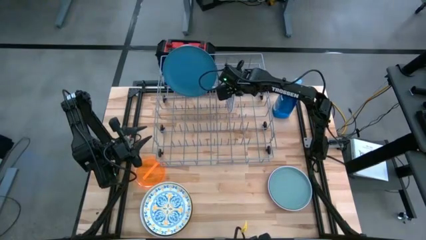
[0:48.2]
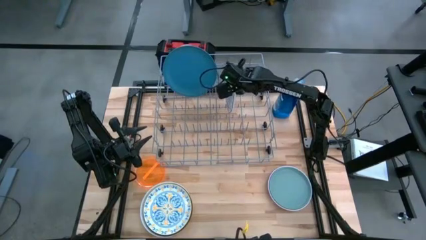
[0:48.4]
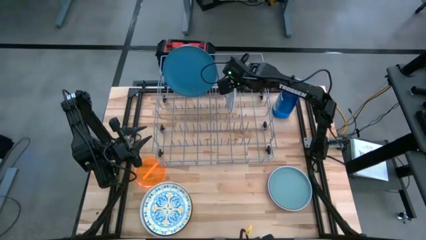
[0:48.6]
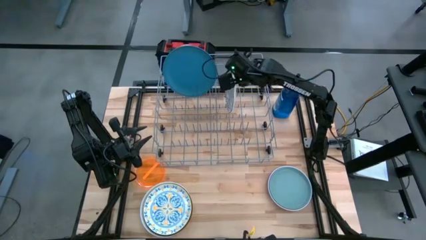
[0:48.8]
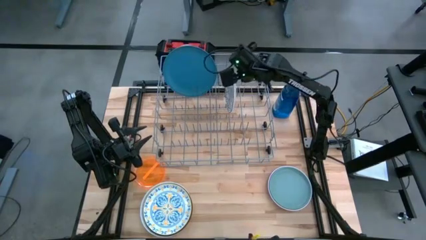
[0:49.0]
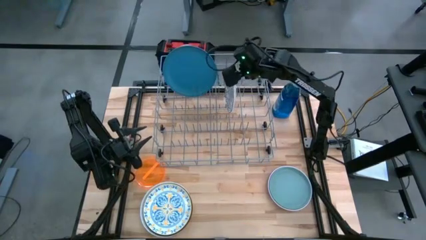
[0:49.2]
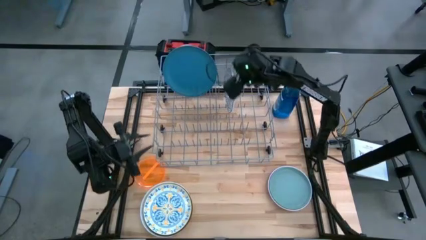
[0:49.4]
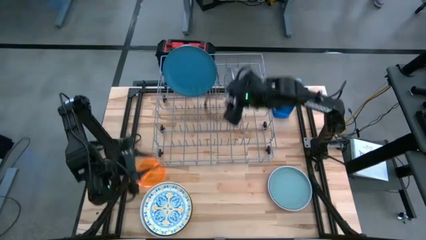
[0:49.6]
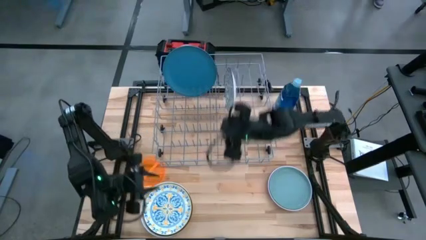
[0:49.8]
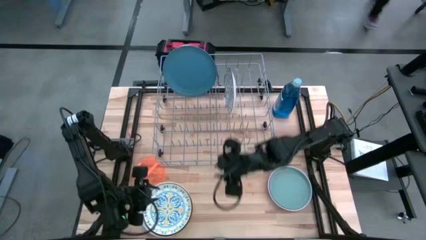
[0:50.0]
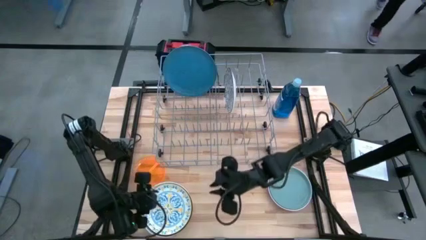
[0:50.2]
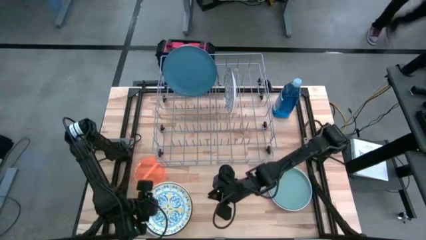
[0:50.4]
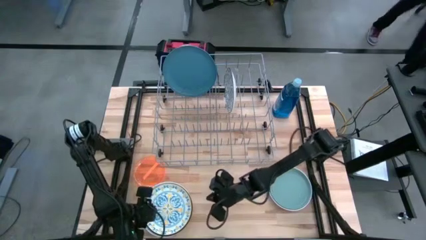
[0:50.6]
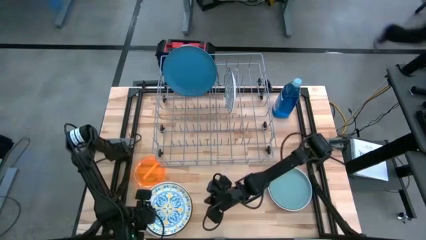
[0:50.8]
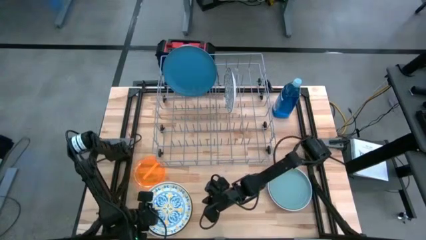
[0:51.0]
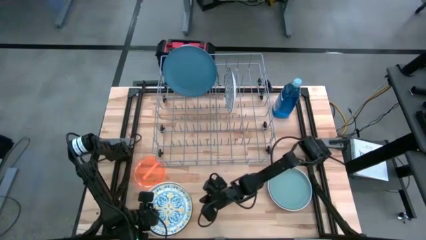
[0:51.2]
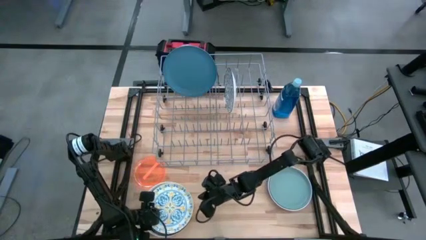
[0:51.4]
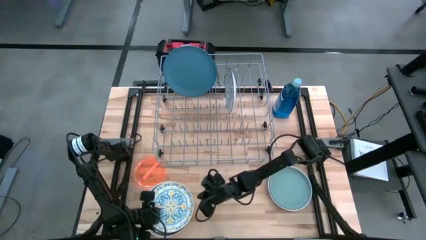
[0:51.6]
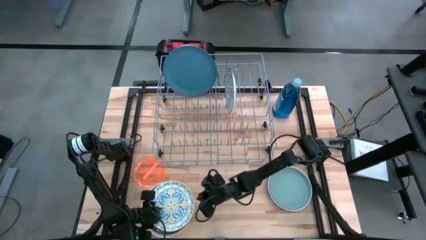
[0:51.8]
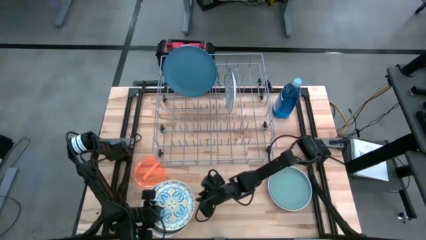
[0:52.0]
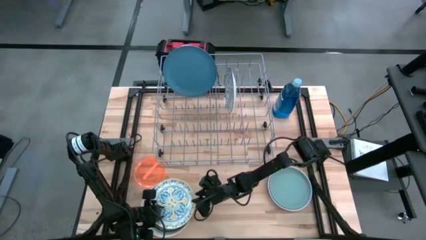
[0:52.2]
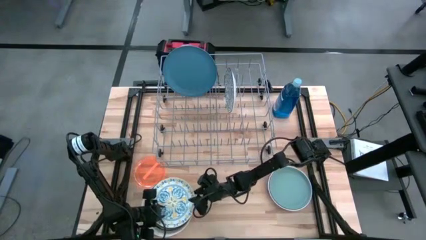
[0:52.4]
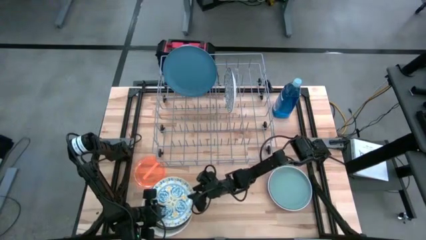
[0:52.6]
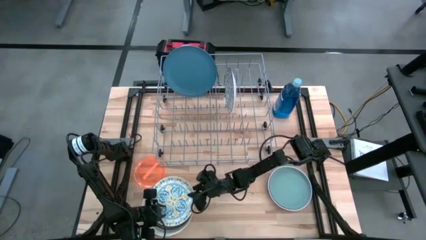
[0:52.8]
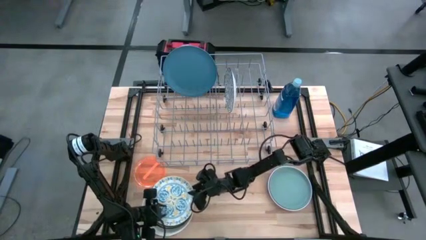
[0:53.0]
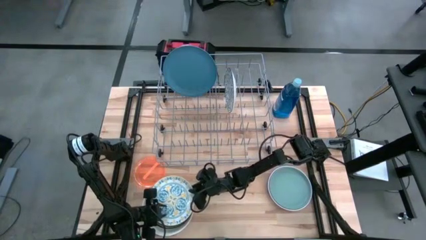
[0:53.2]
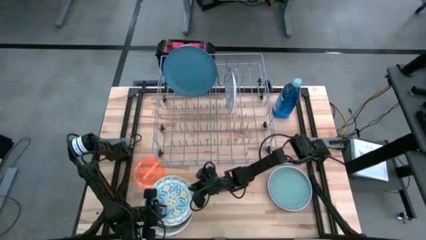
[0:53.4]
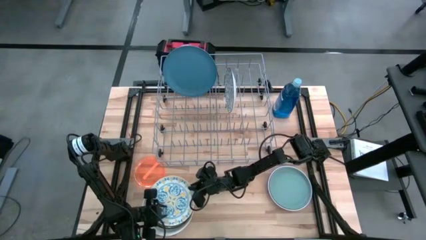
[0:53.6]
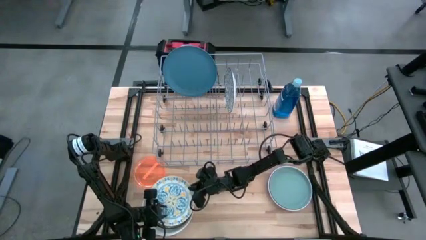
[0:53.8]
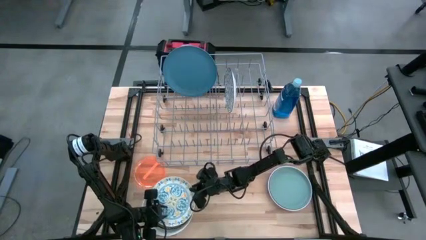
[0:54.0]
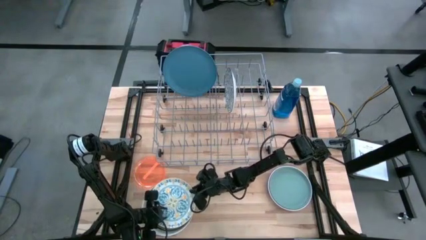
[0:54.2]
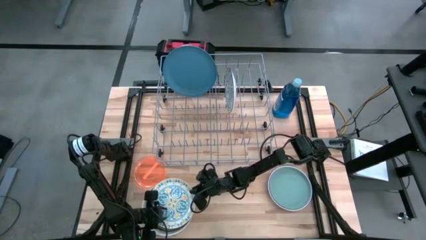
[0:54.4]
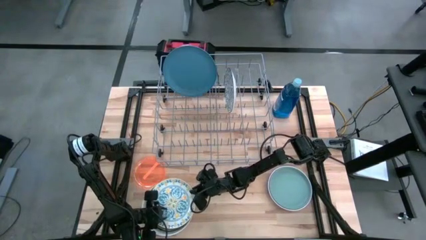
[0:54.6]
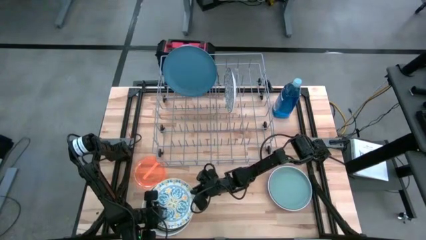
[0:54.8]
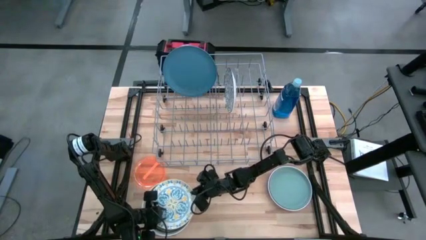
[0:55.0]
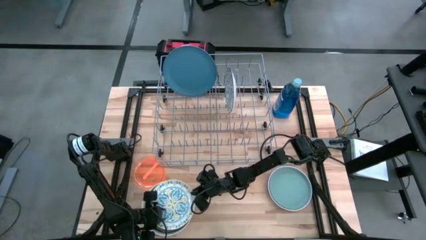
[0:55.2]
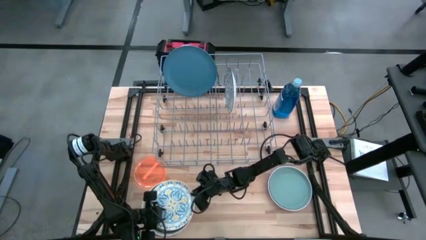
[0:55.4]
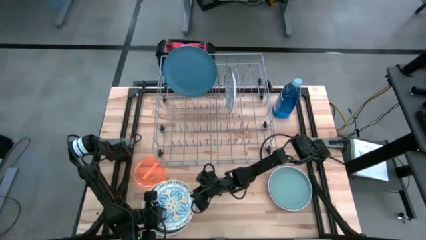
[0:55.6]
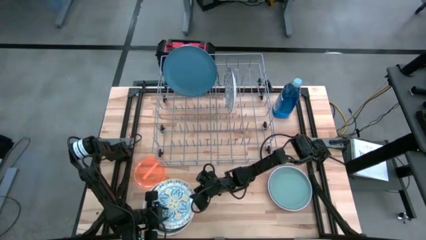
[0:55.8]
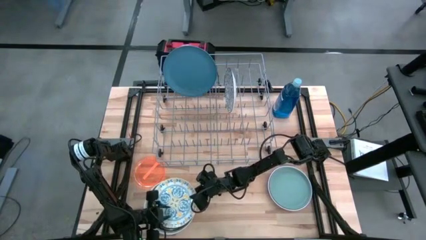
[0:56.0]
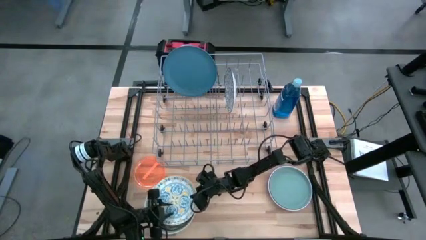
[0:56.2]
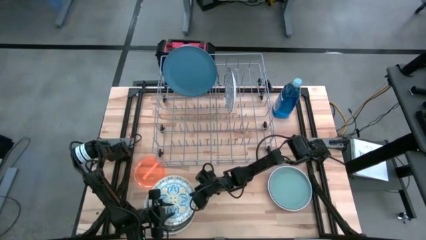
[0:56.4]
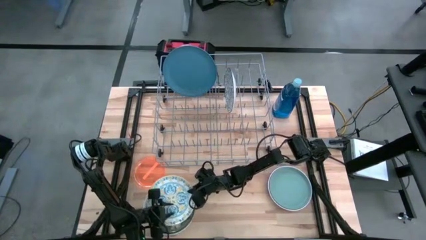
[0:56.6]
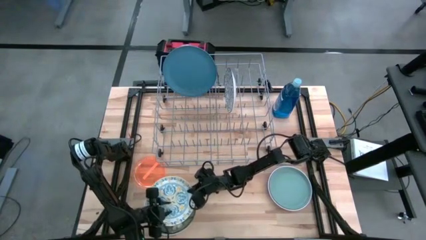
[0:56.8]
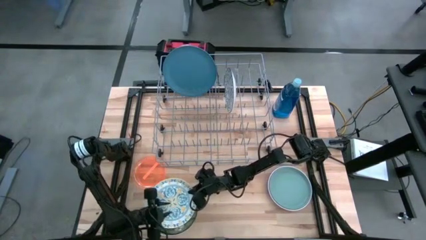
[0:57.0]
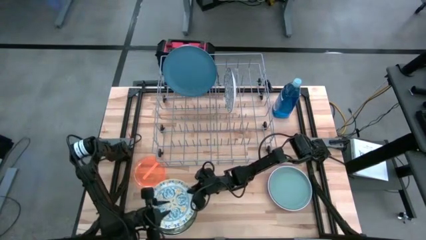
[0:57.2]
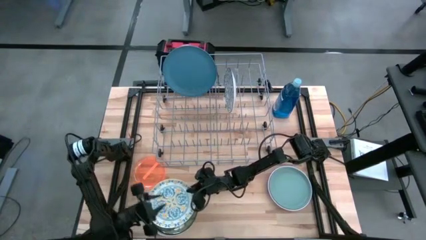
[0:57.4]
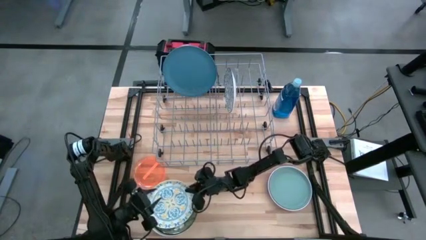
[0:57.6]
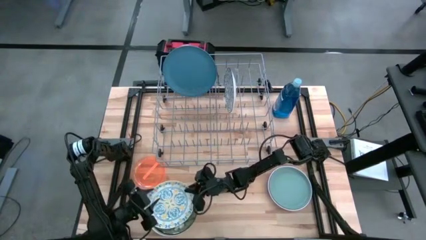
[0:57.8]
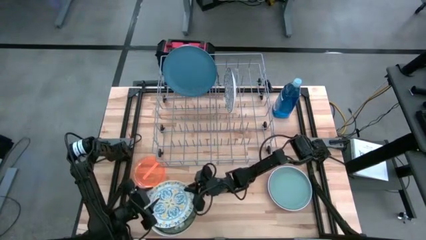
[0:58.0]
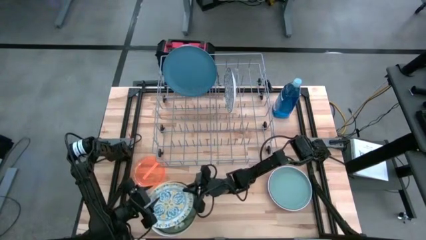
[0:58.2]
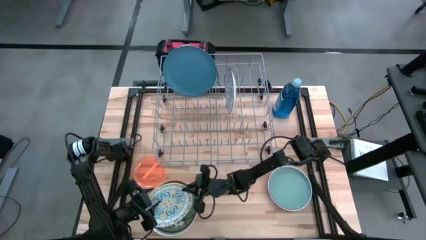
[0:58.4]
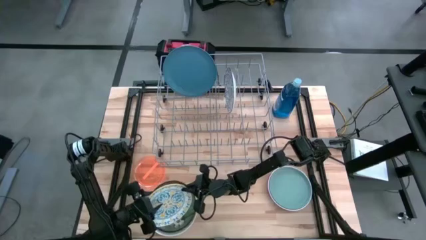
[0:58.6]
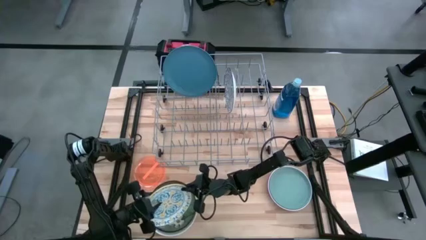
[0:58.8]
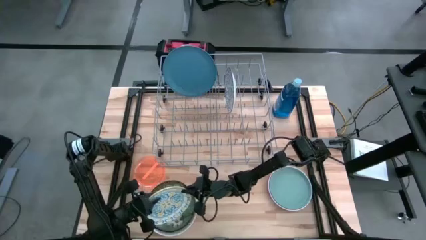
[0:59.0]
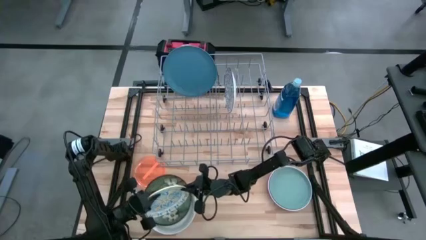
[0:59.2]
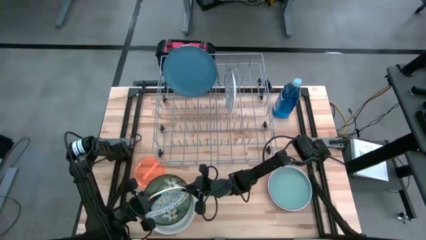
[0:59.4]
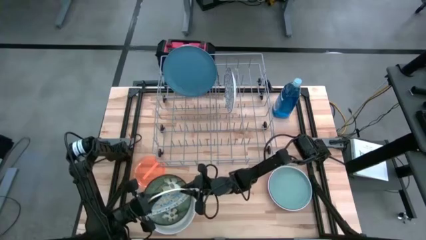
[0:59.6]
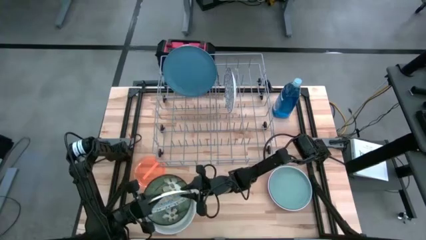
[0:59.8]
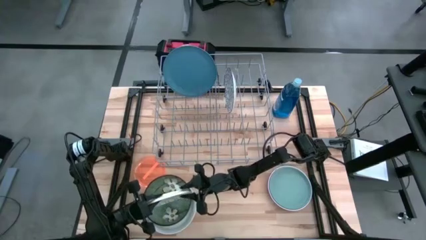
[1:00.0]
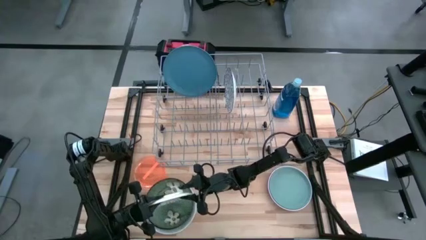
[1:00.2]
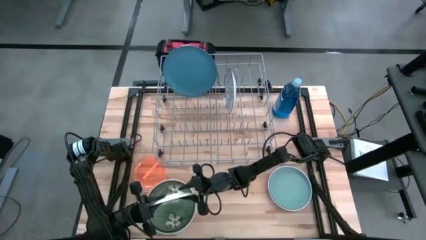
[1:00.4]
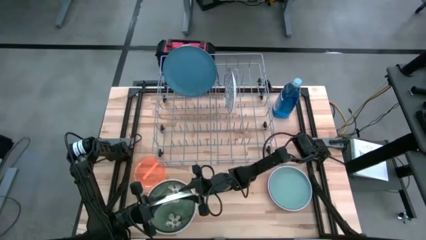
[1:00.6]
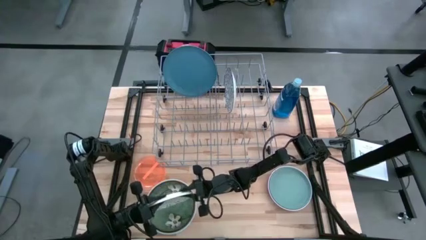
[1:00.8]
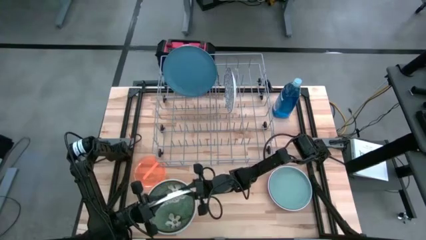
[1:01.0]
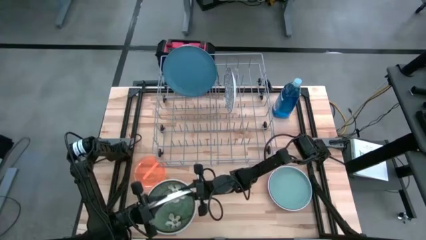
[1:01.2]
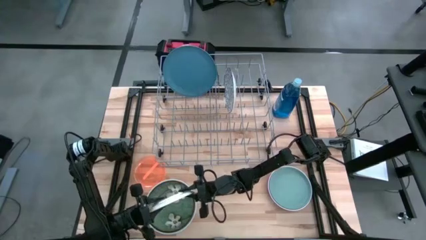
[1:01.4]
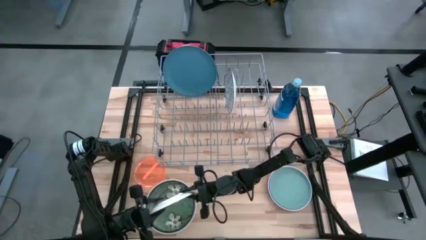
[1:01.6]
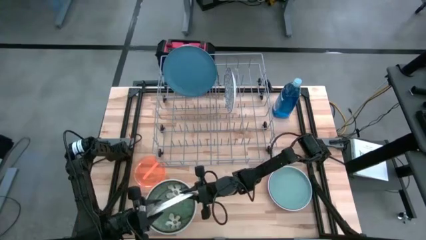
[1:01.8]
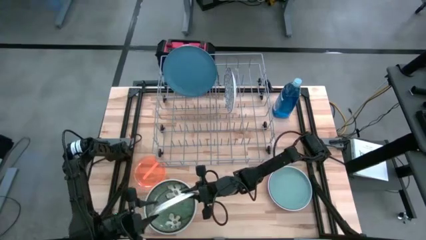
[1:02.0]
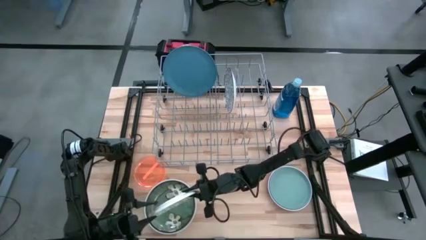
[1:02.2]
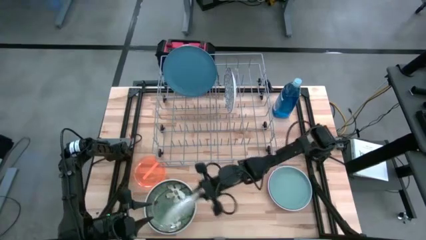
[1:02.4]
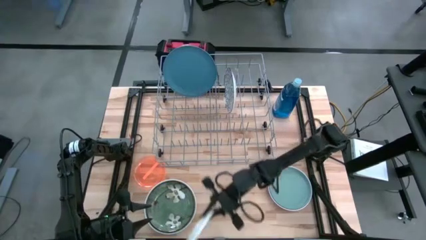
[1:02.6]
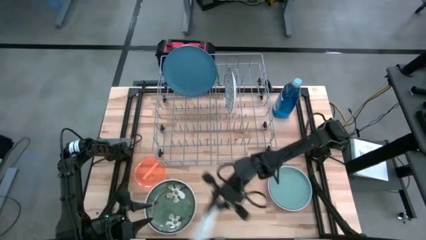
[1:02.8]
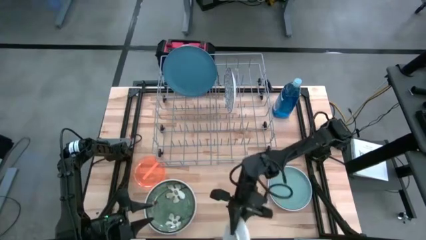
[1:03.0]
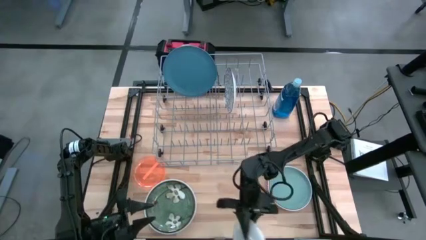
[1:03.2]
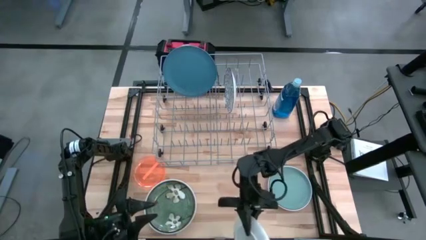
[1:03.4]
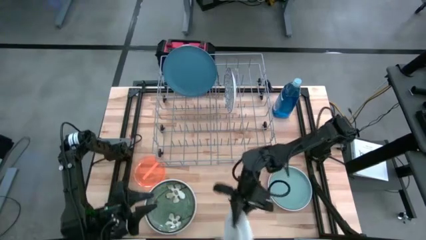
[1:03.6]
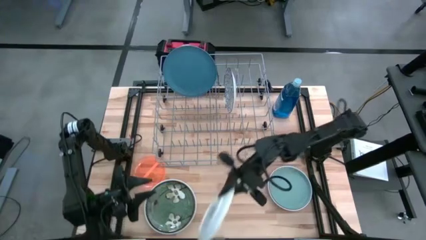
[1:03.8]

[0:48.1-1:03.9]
Task: Sort dishes
Put the white-orange patterned plate in the dish rack
